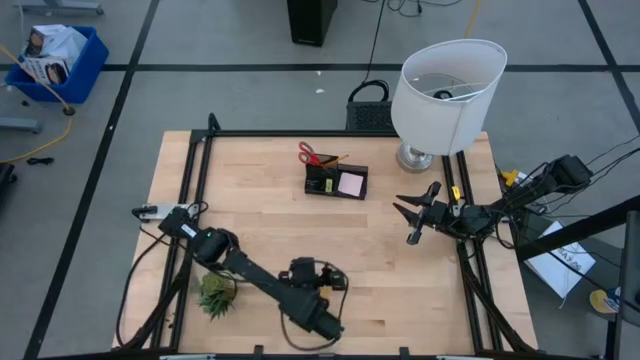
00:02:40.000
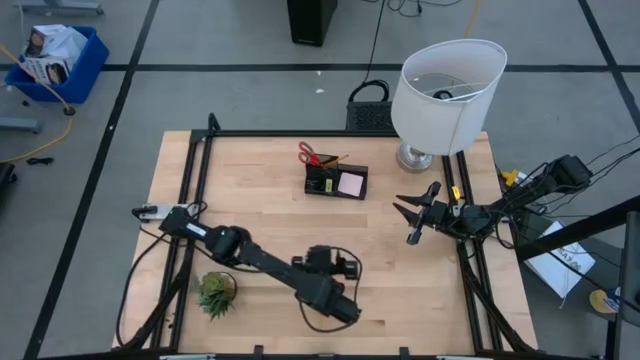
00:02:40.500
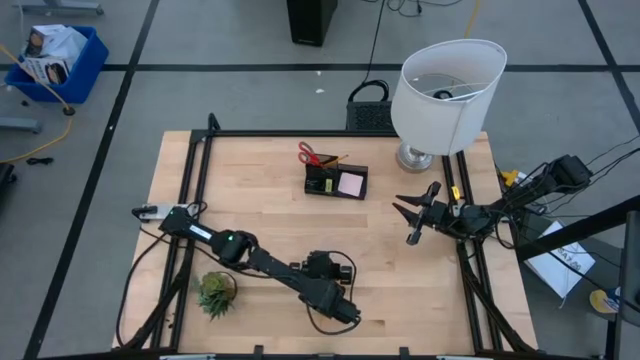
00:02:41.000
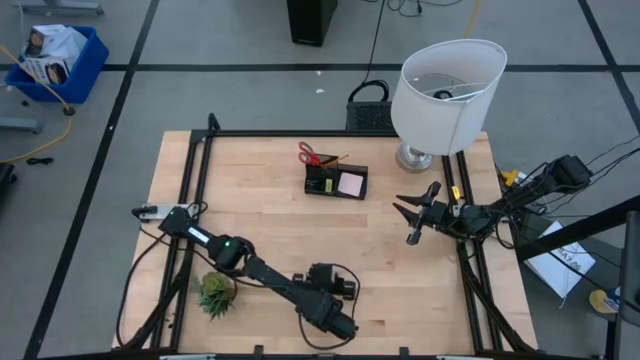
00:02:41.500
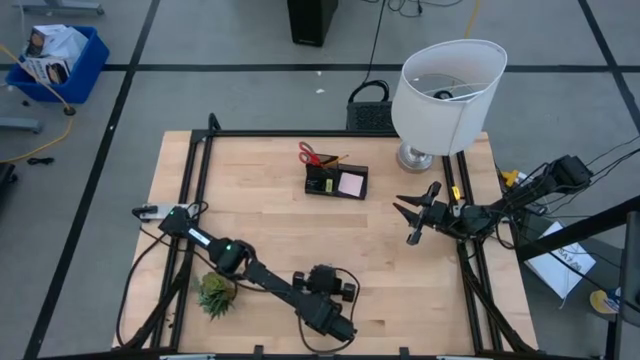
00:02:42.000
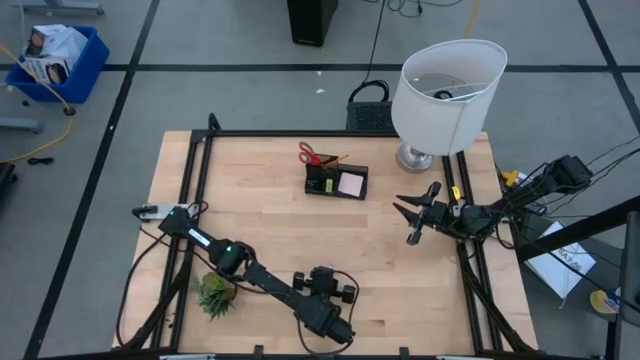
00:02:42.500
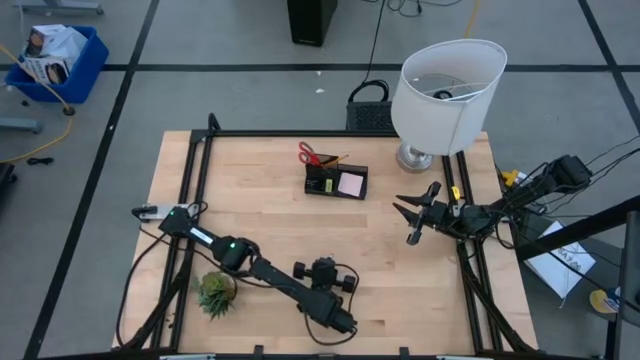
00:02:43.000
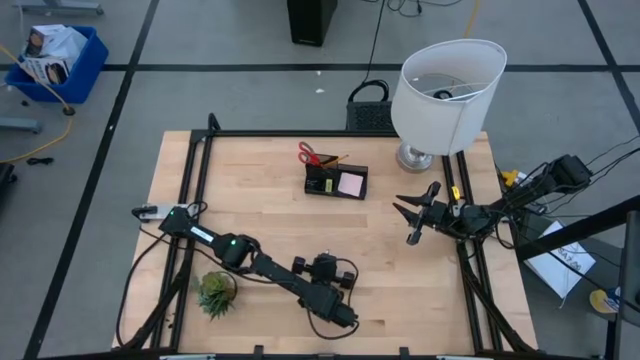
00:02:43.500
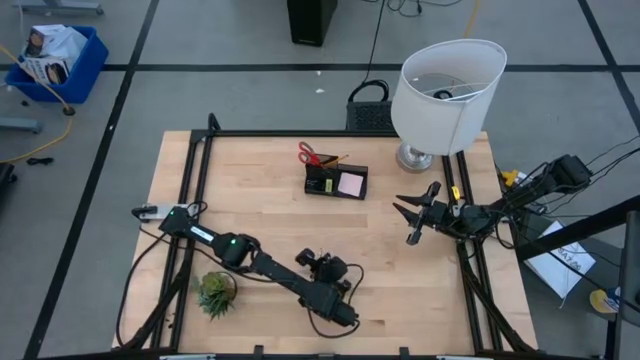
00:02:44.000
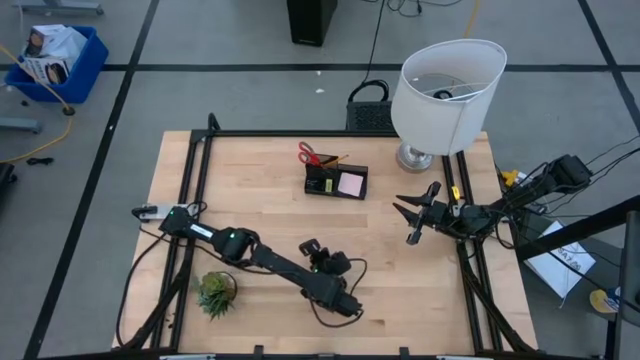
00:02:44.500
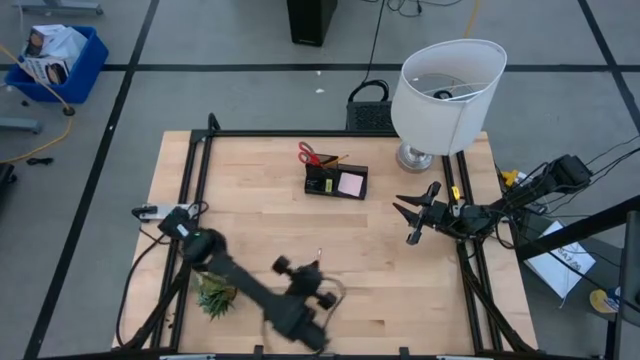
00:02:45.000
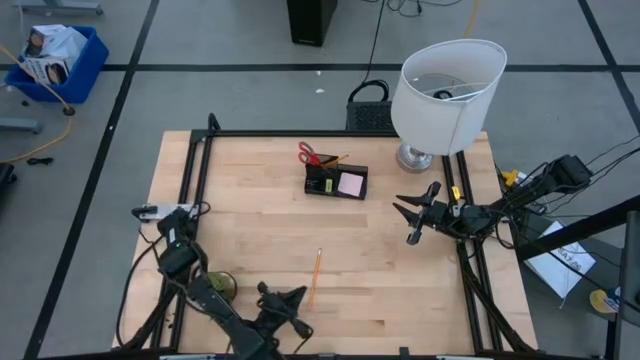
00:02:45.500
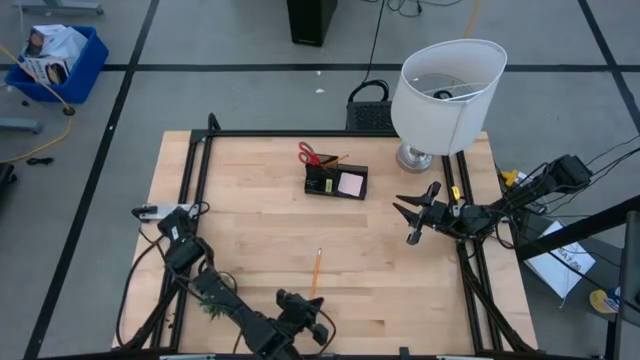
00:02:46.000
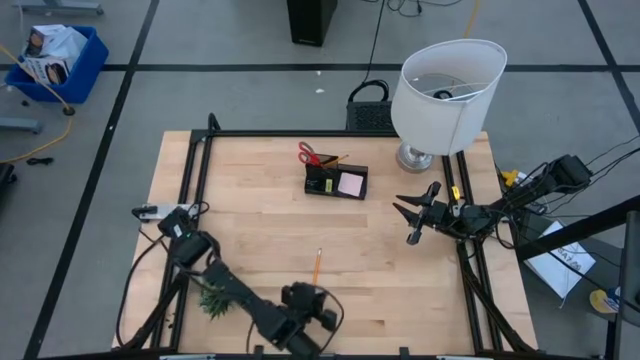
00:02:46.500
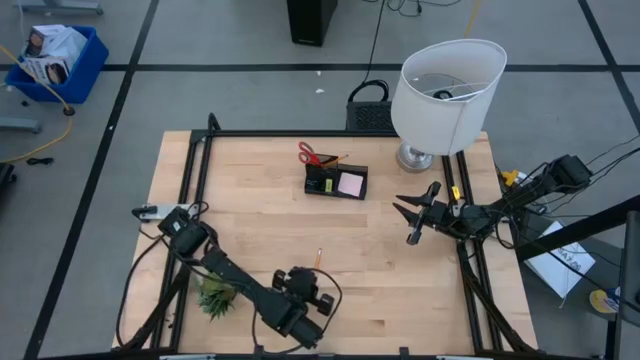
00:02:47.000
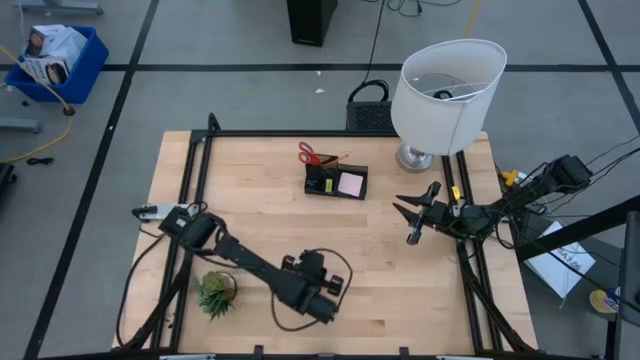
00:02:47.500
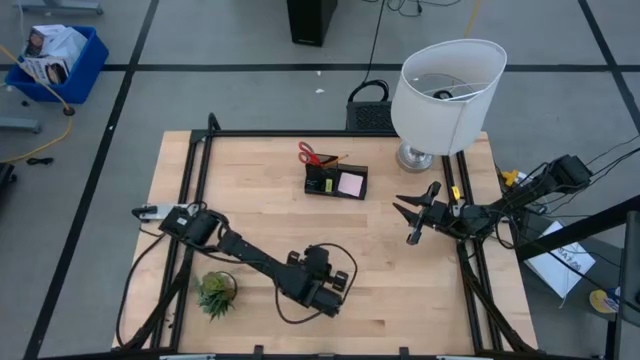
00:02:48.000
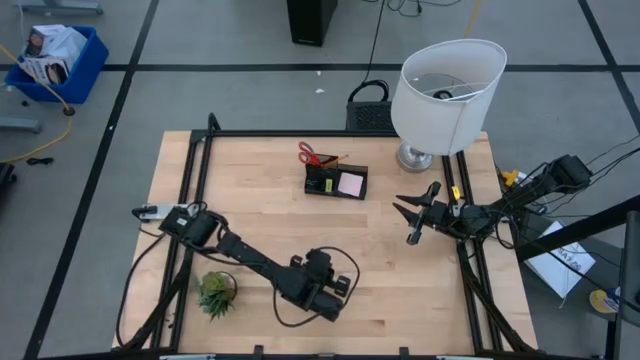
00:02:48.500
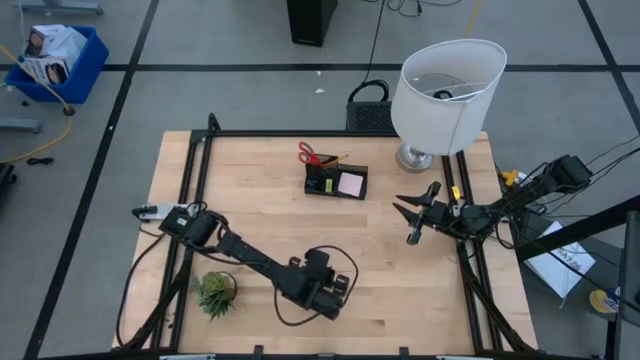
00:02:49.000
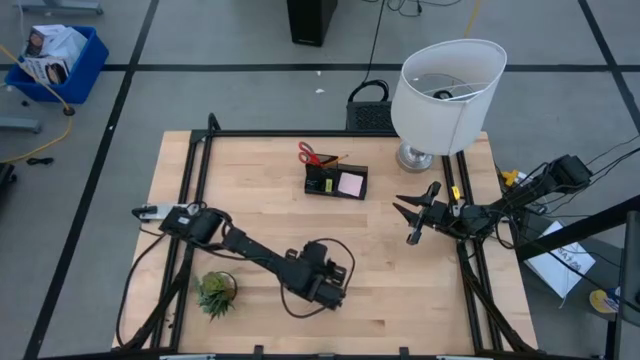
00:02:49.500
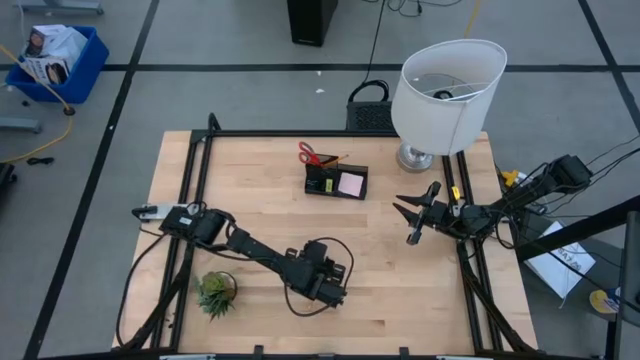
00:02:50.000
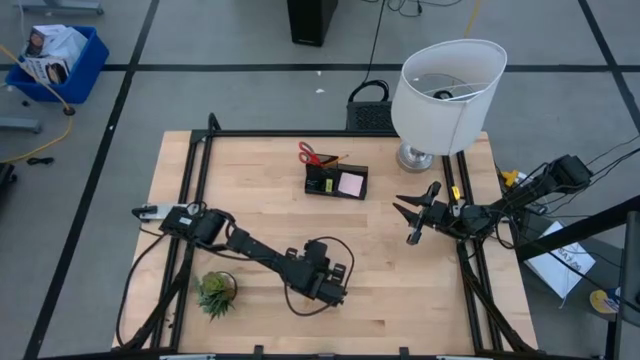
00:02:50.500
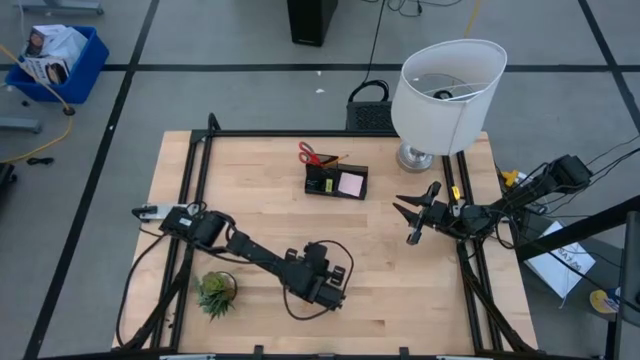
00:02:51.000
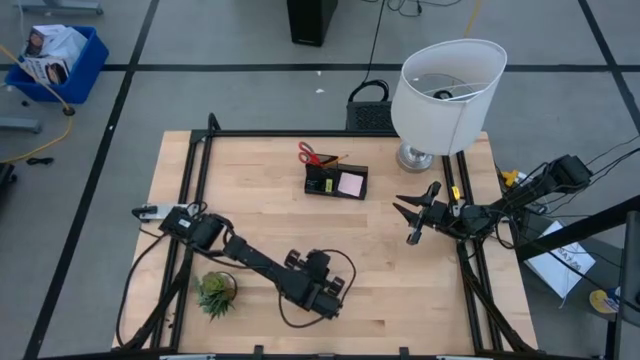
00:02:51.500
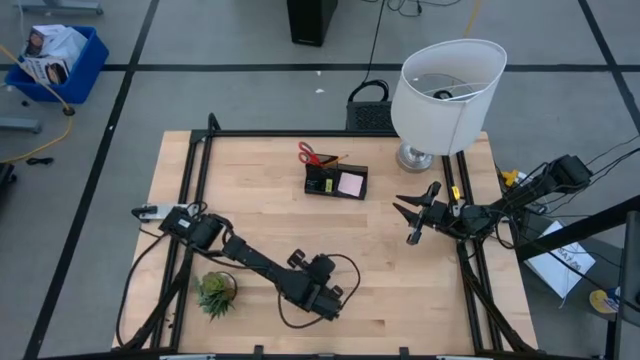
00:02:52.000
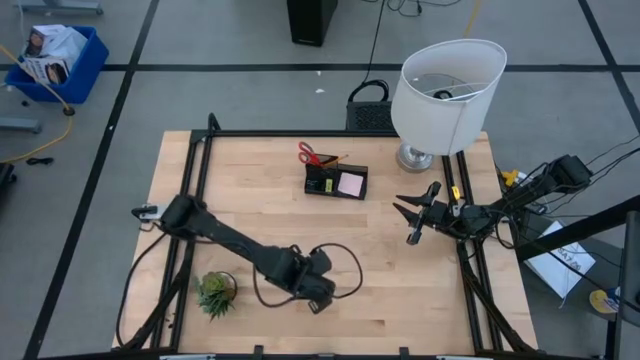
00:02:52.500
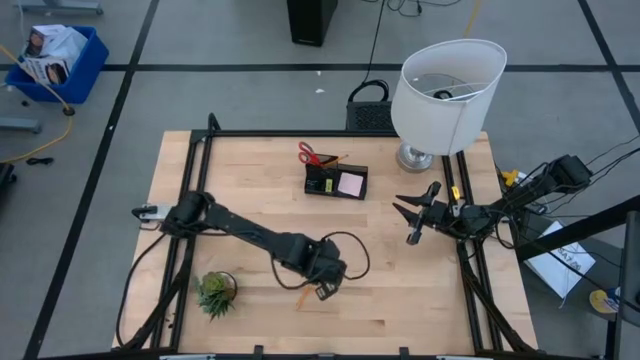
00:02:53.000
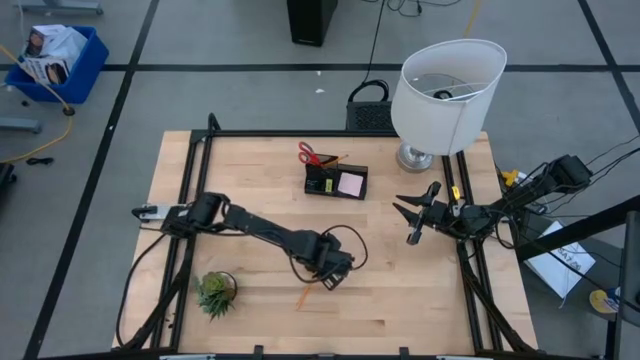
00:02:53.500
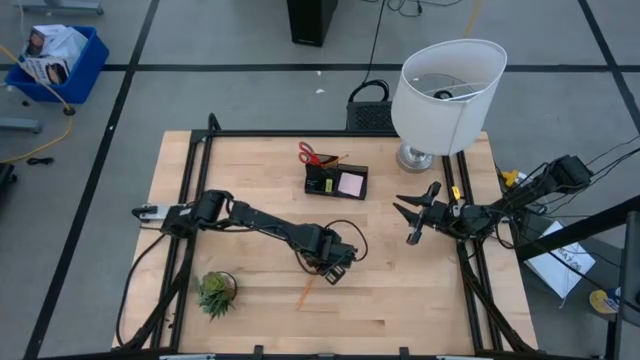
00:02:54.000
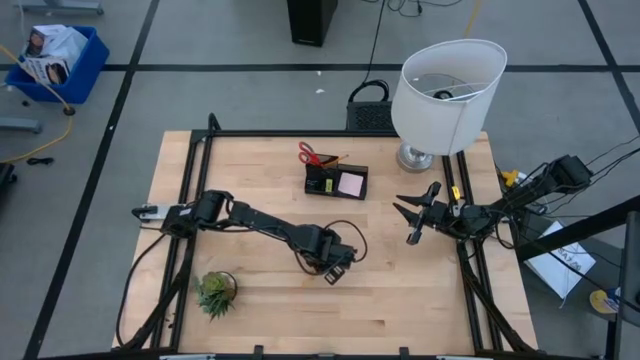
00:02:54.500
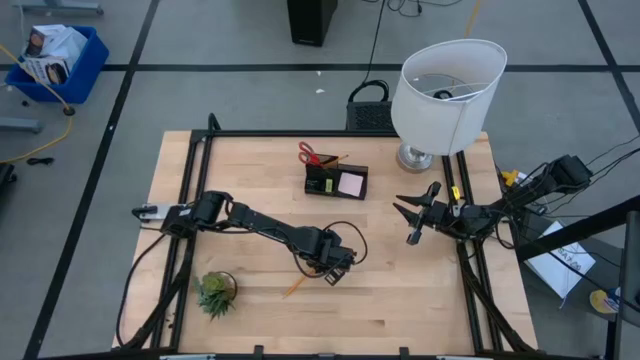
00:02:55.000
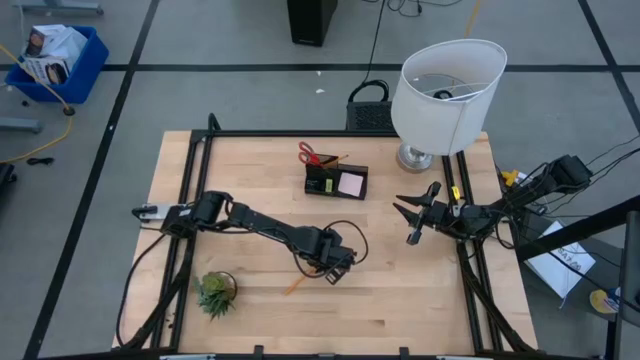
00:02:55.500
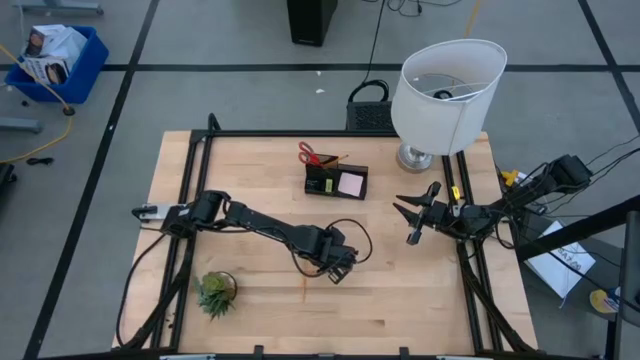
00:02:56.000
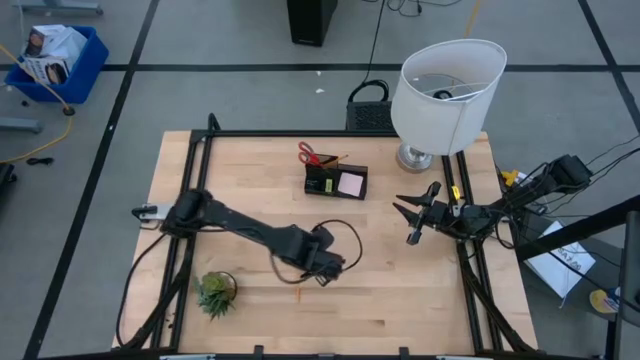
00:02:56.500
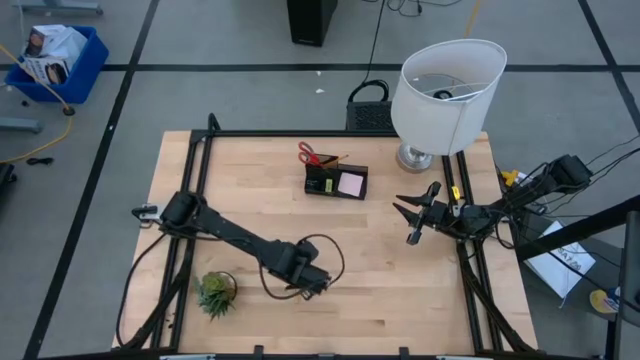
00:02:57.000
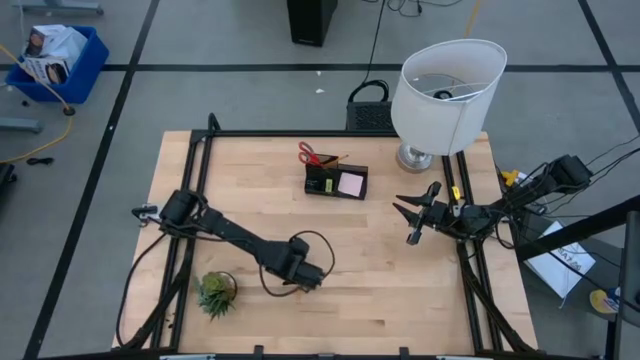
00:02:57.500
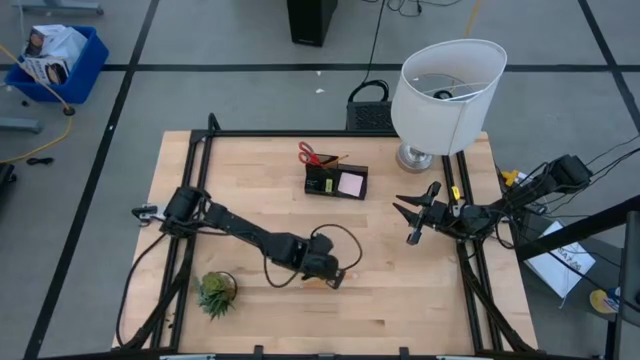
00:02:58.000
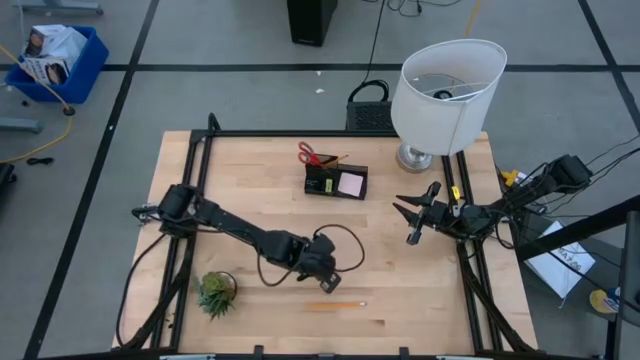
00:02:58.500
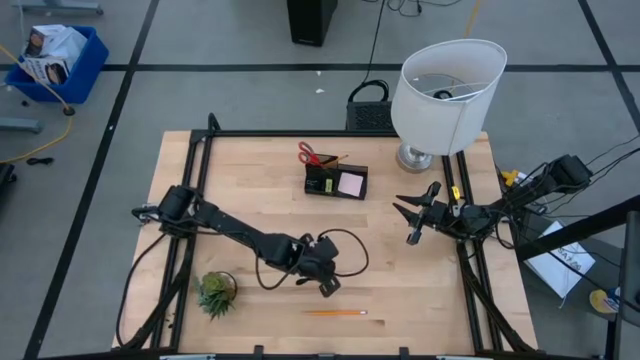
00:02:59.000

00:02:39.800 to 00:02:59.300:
Task: Pick and place office supplies into organizer
Put the yellow pencil into the desk organizer
